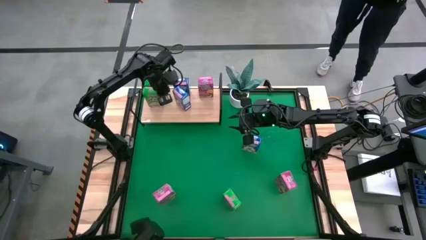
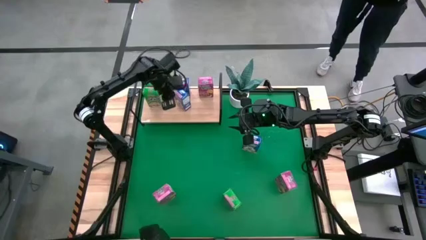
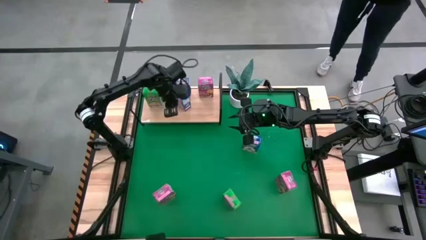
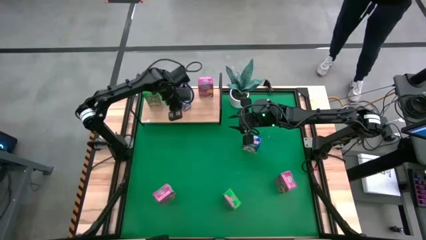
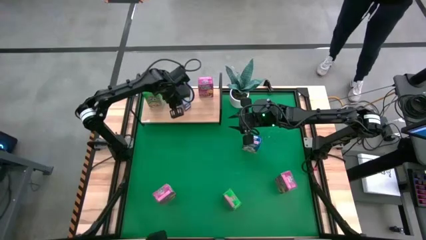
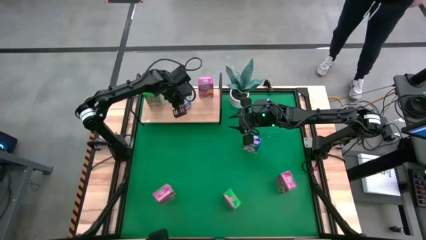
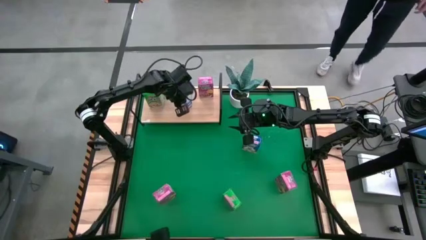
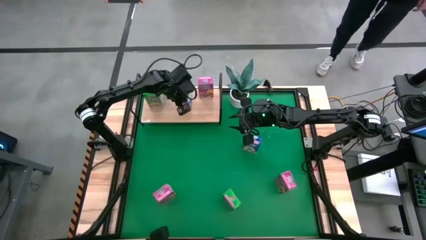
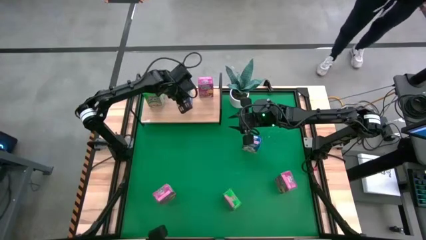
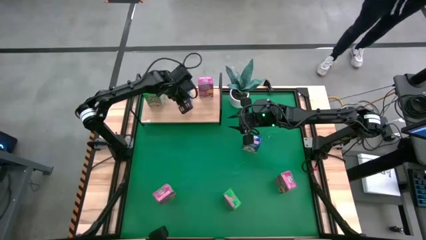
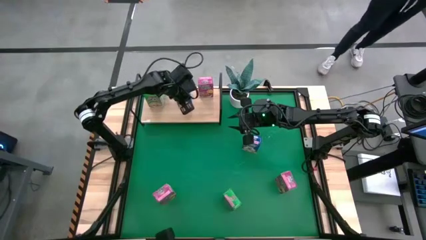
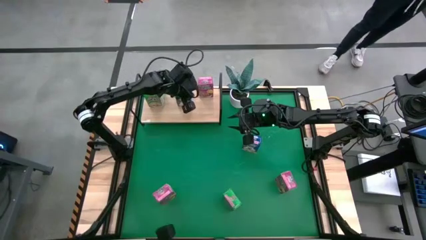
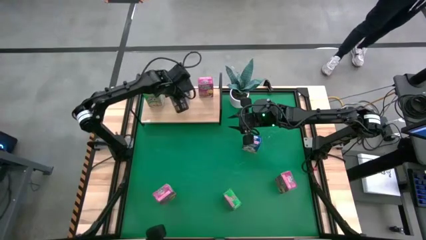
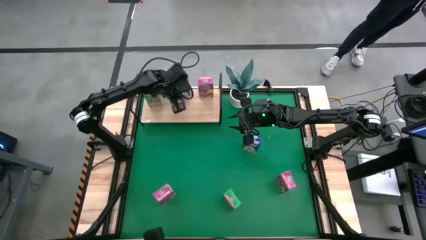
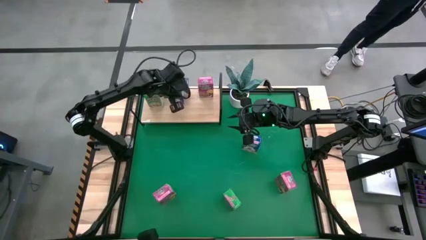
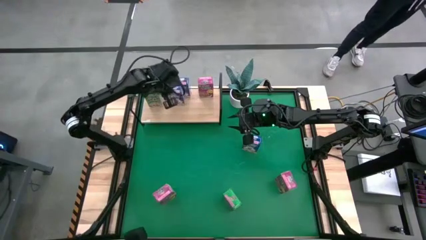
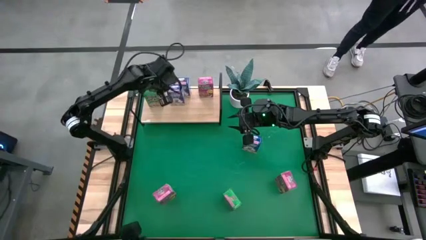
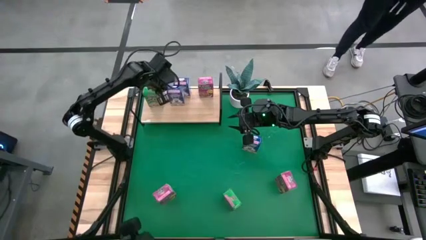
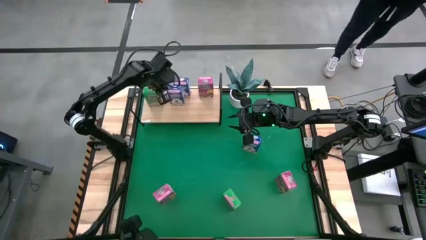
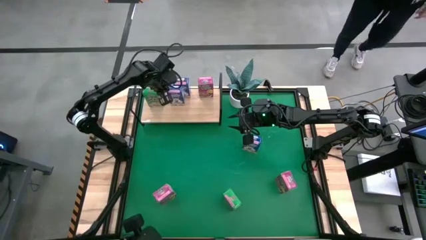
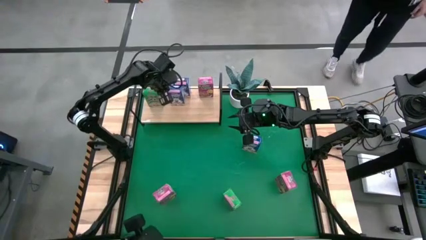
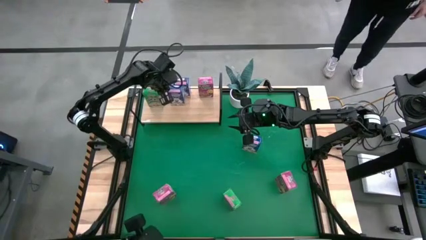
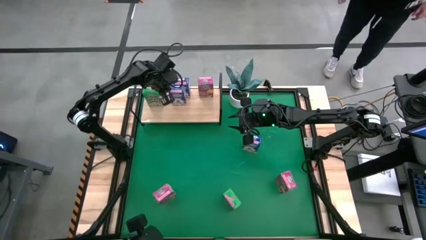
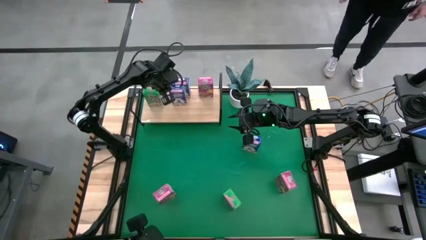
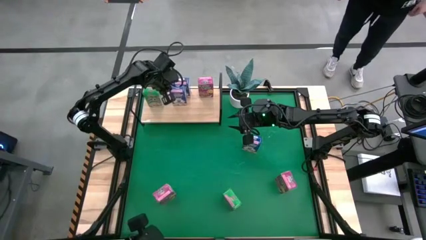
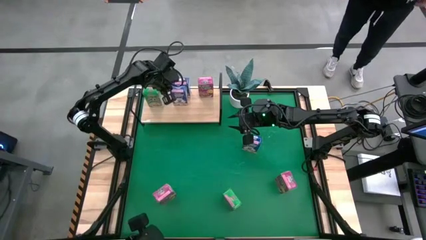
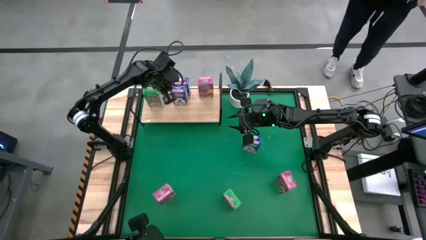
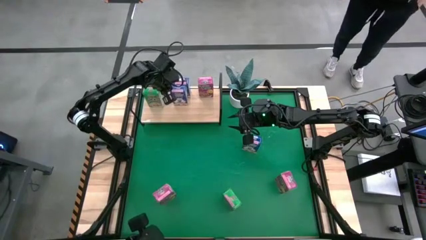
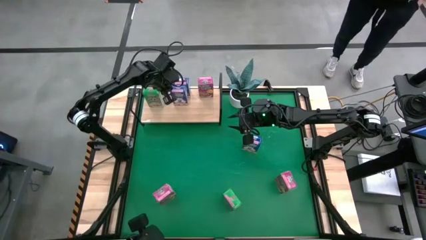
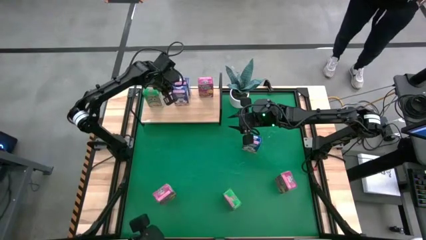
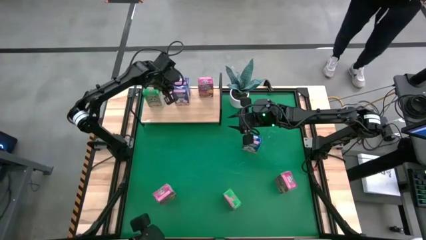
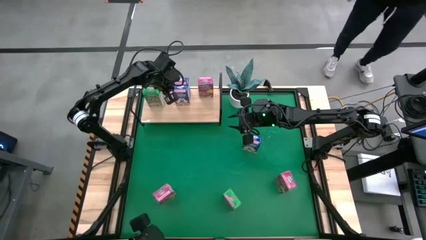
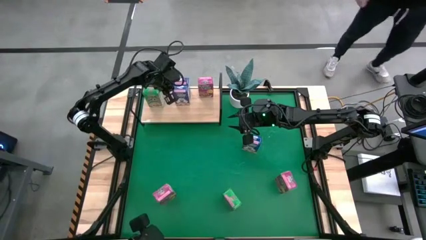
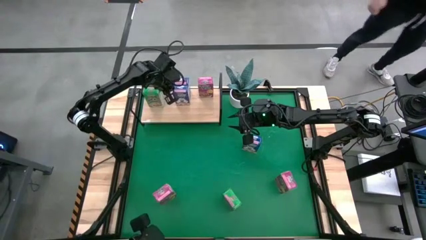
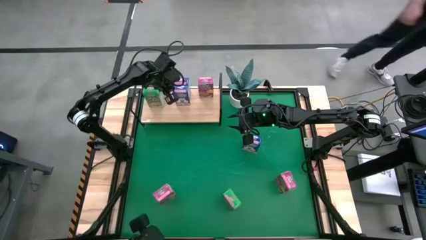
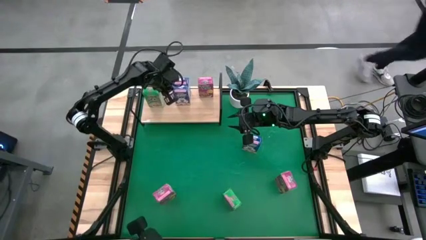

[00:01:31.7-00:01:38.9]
Task: Stack cereal on shelf
Adjust the blue cereal on the shelf
